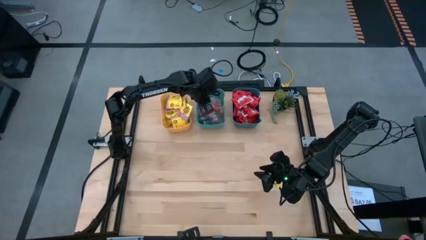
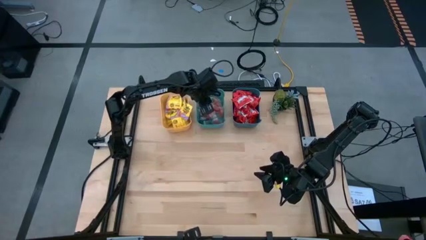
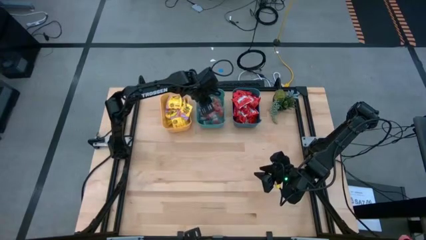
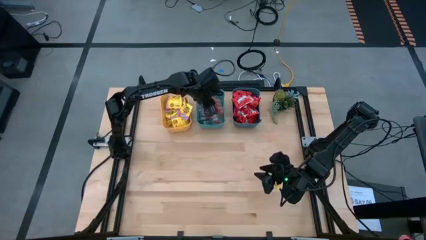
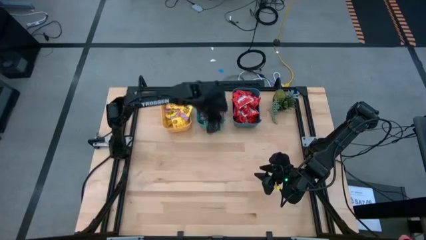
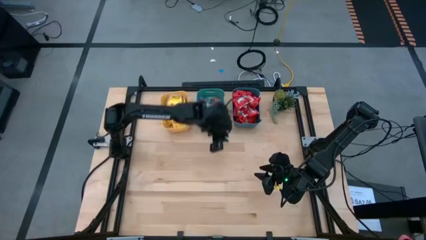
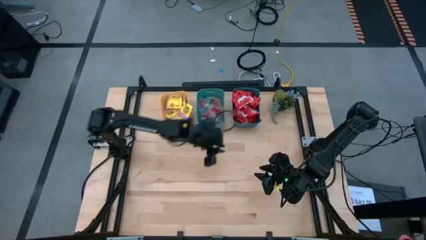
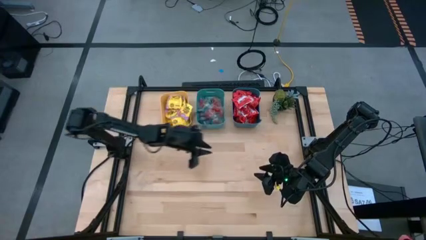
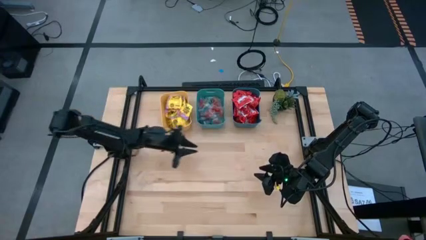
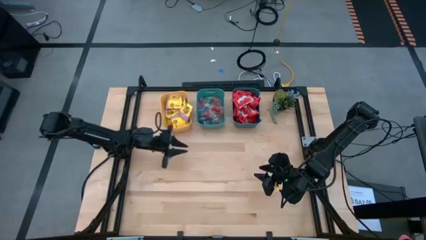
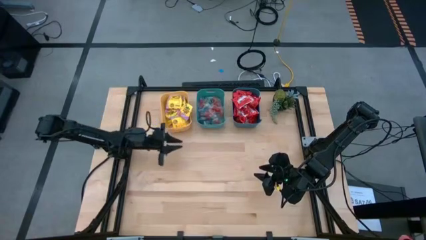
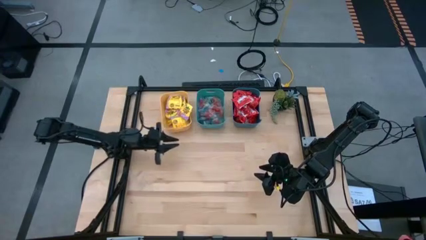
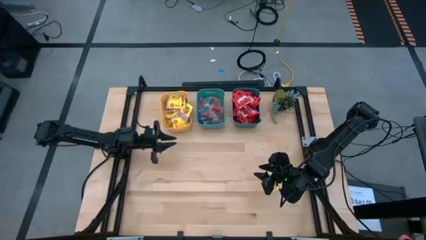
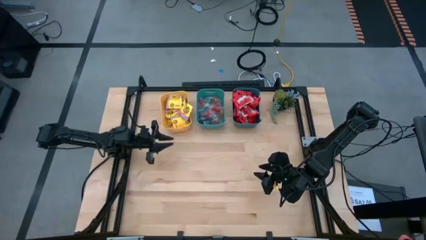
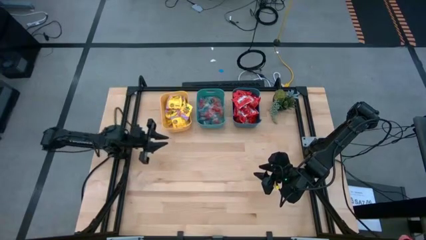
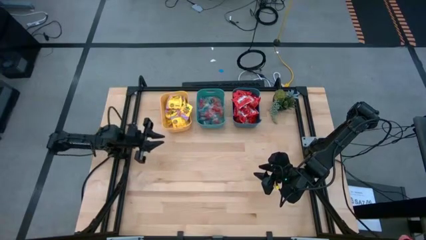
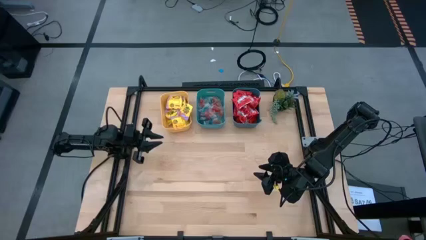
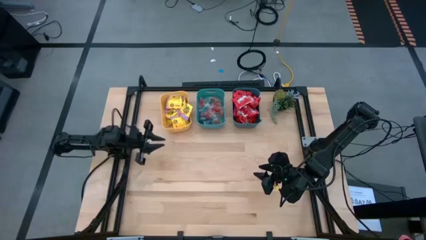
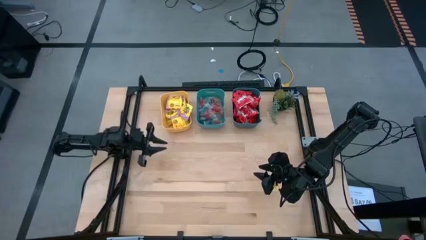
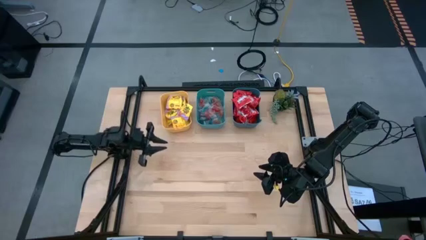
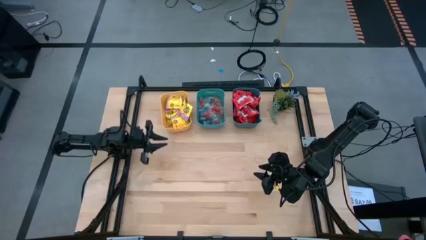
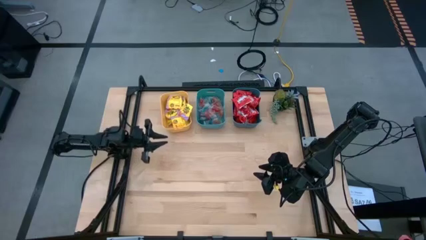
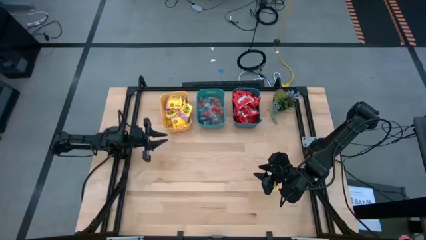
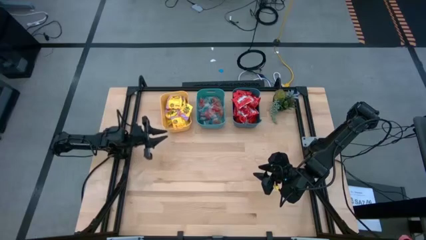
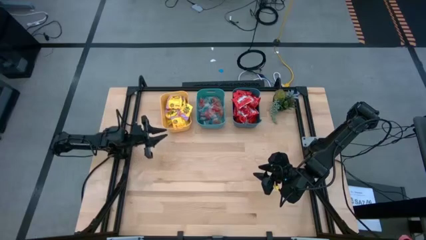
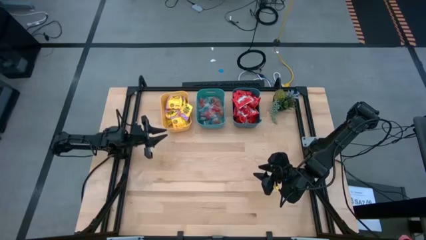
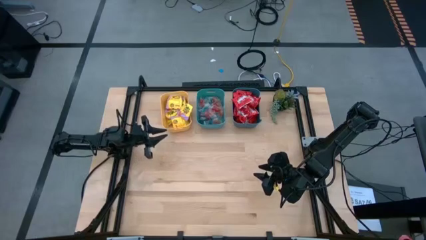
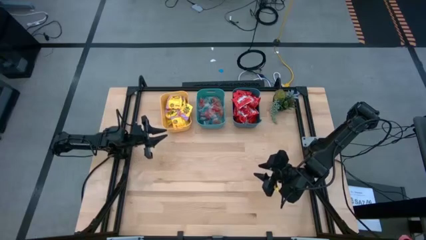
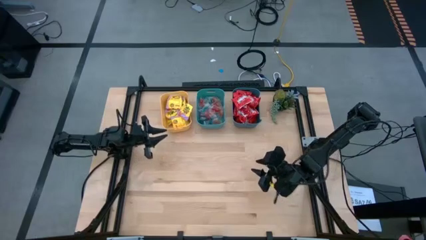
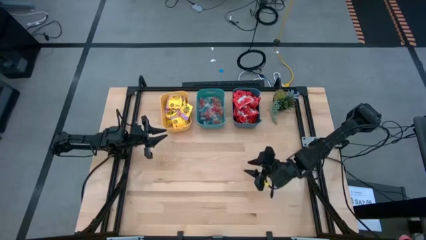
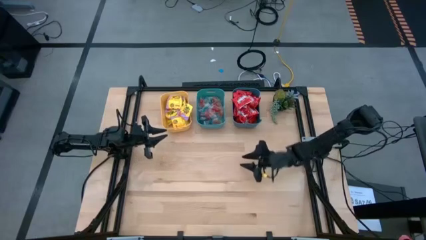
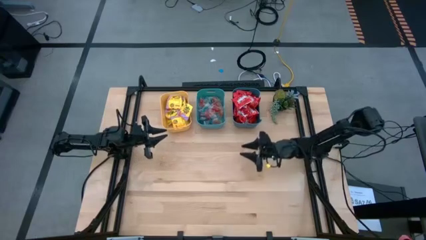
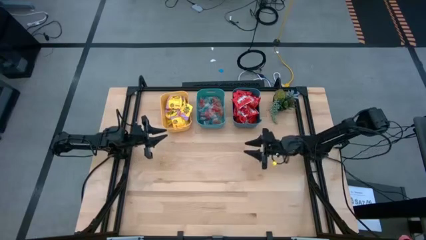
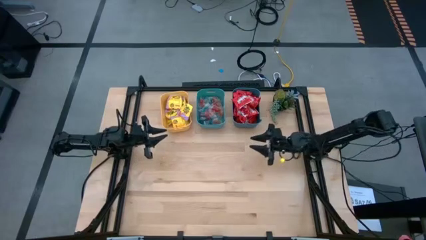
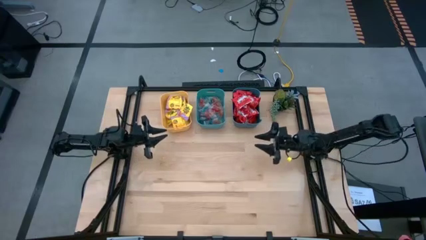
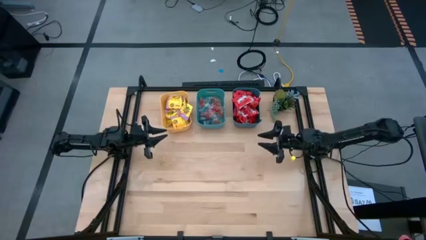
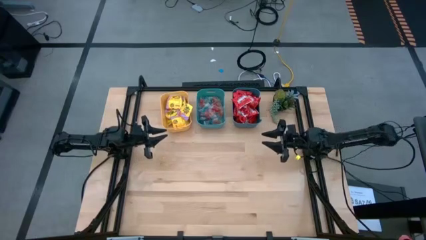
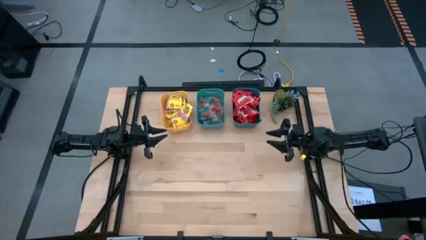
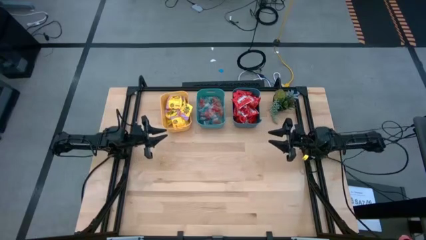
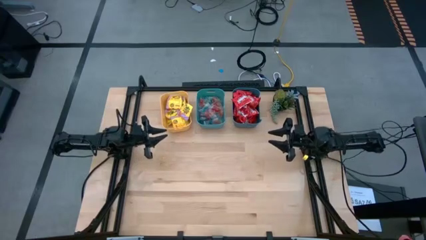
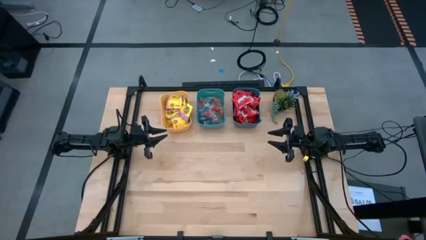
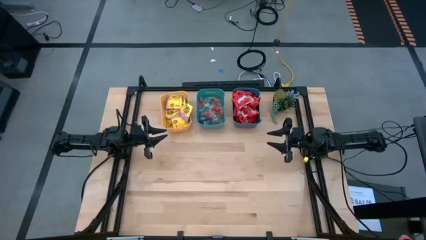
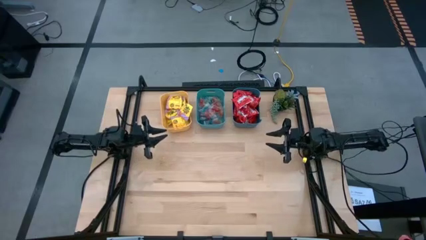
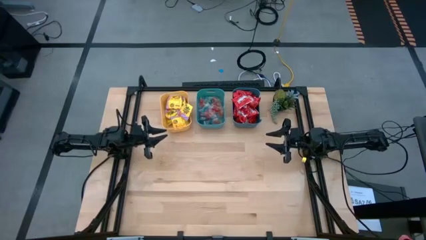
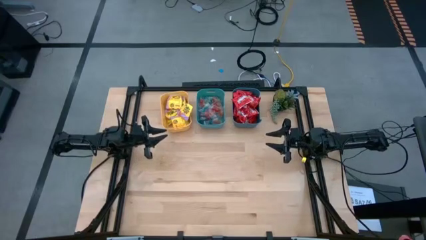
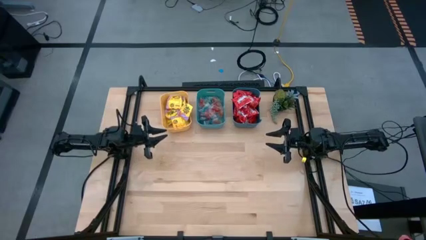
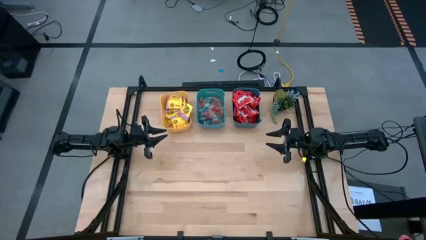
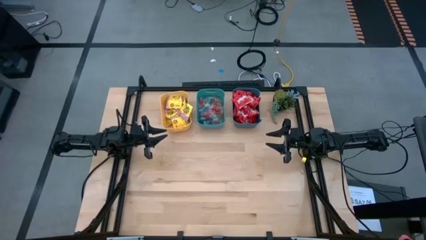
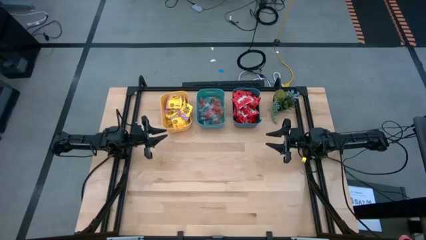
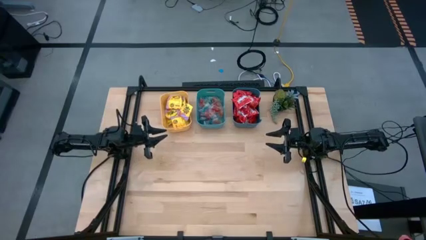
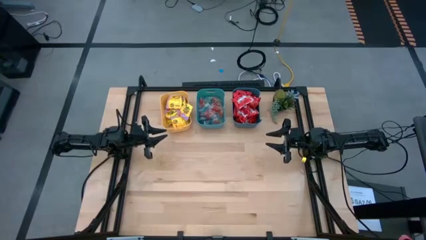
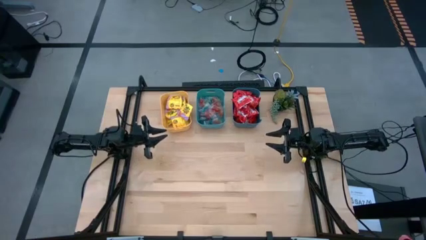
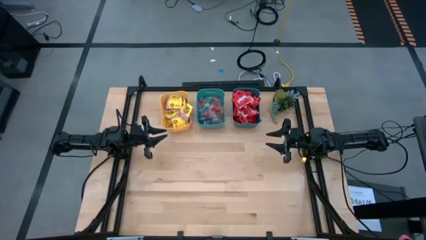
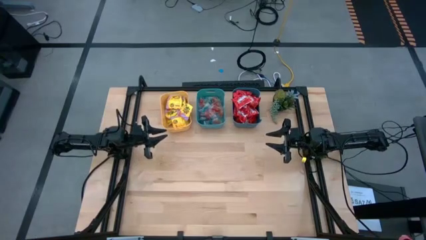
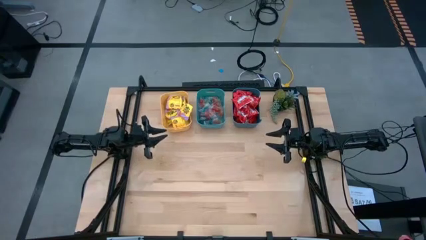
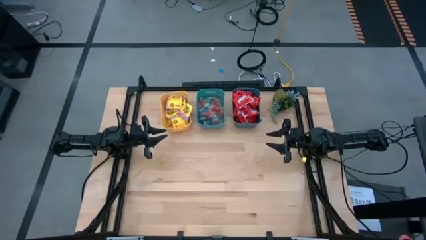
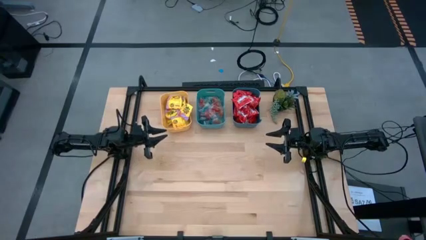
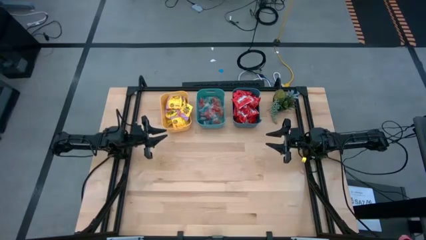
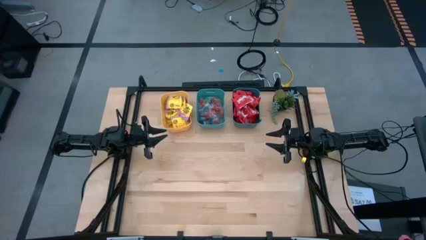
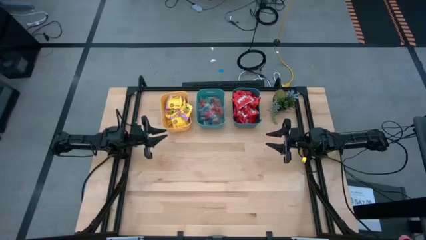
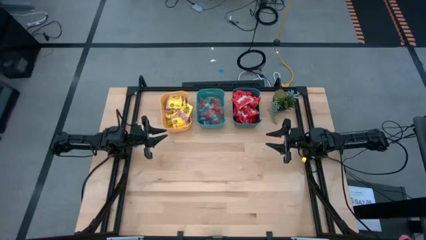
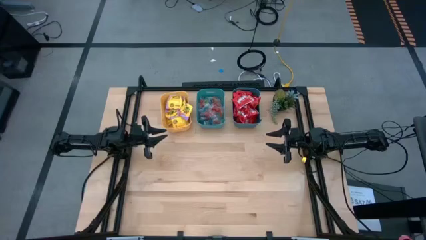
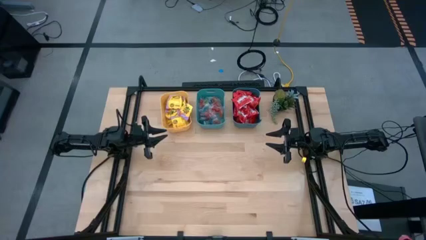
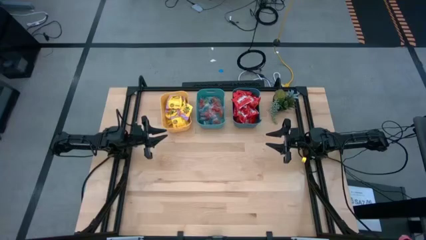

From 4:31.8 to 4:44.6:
Task: Sort candy
Return to Home Position

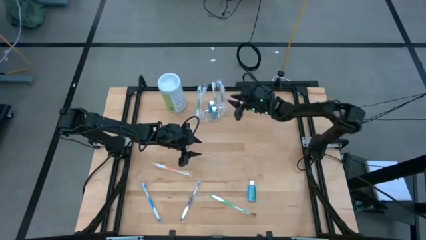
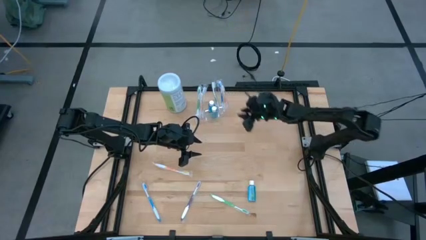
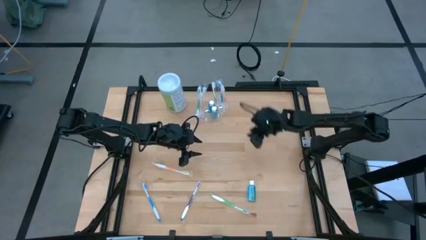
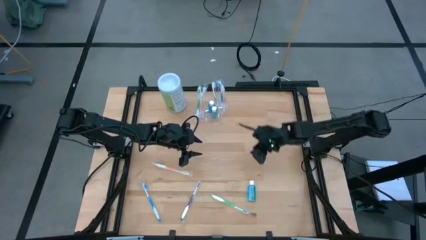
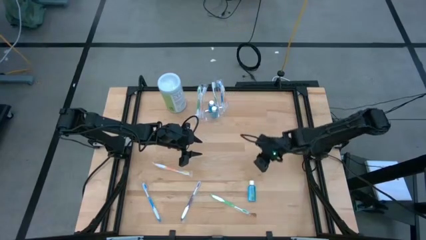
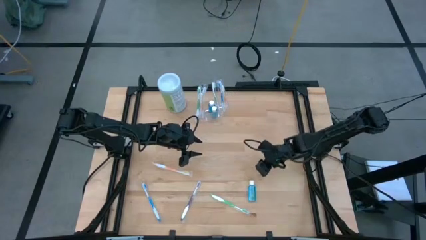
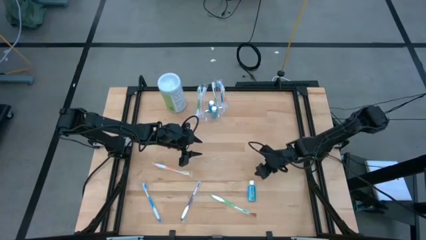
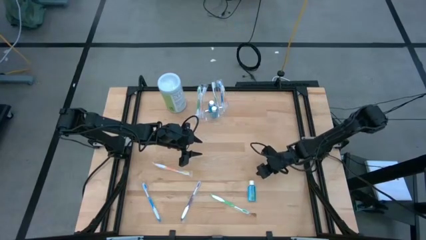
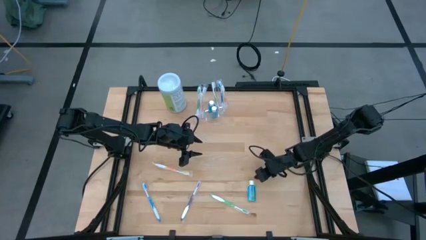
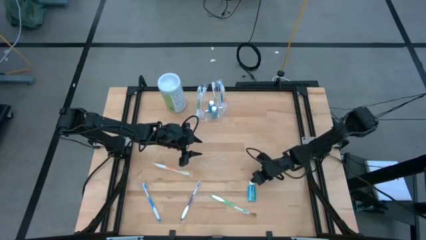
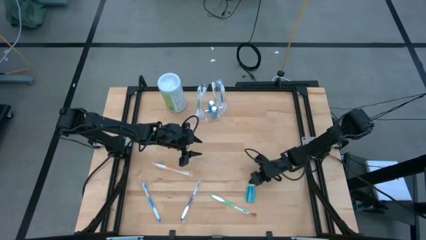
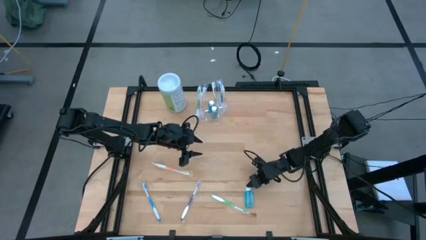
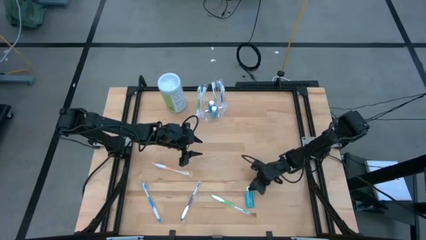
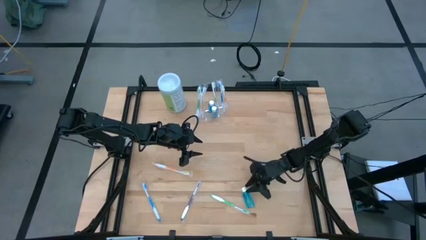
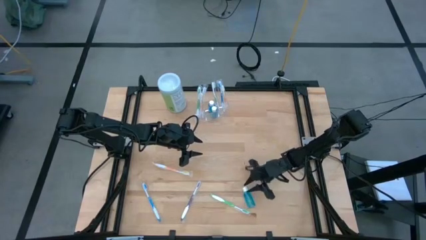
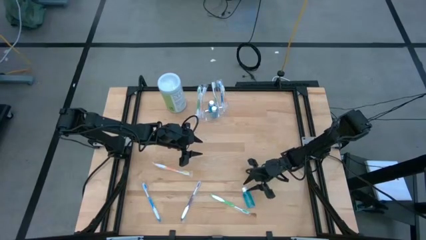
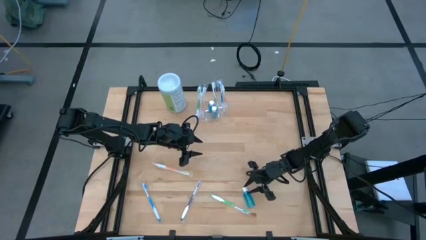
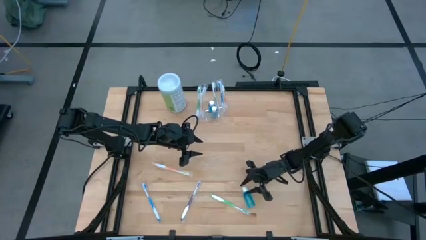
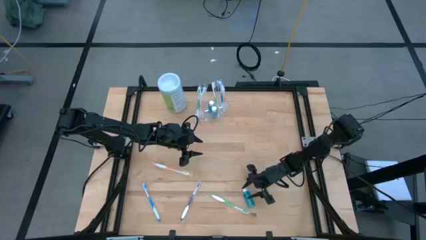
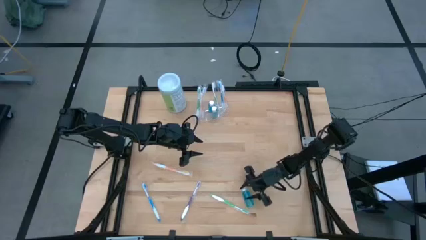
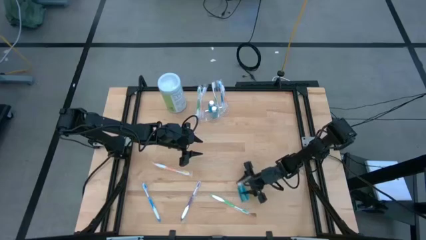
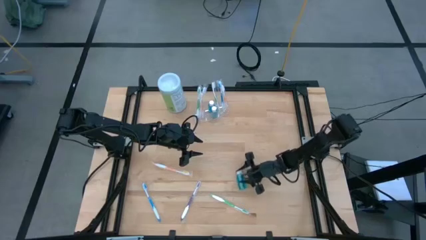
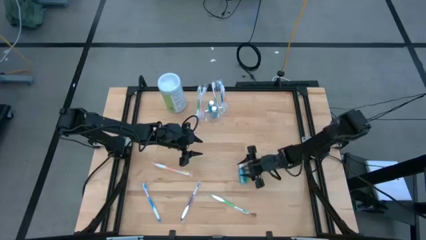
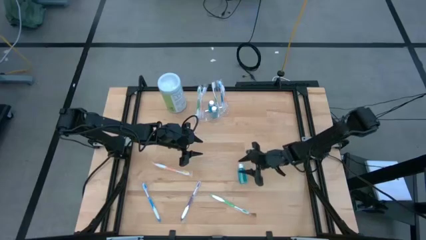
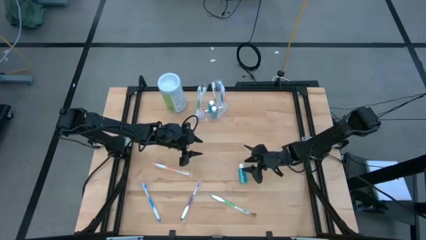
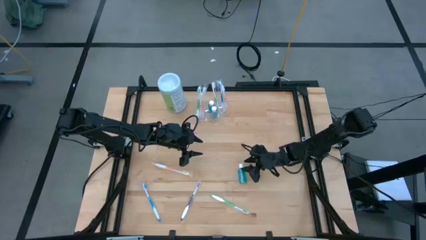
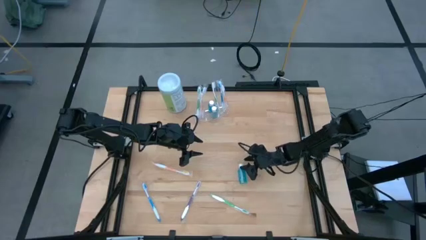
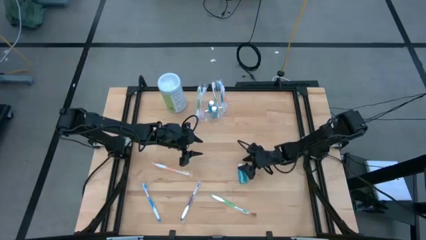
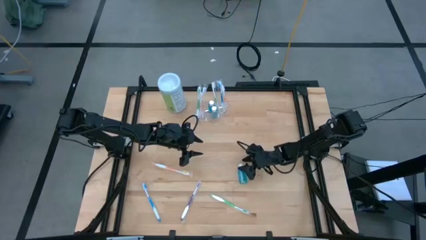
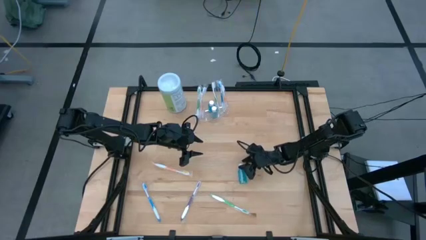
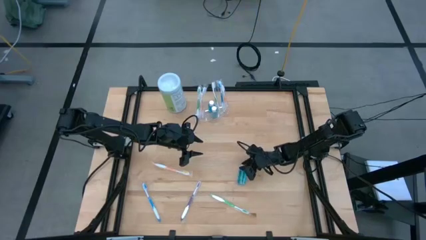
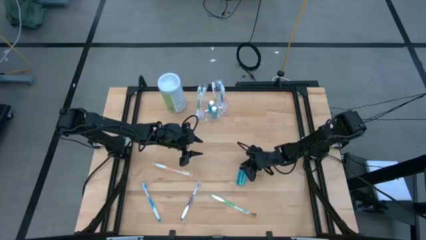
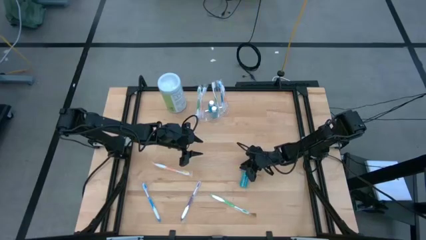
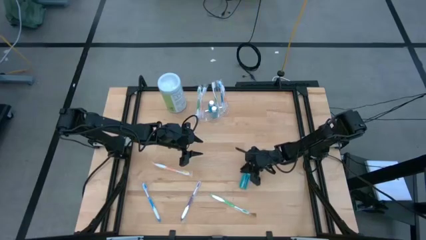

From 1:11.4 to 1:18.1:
Task: Pick & Place toothbrushing station
Put the blue mouthwash into the transparent organizer
